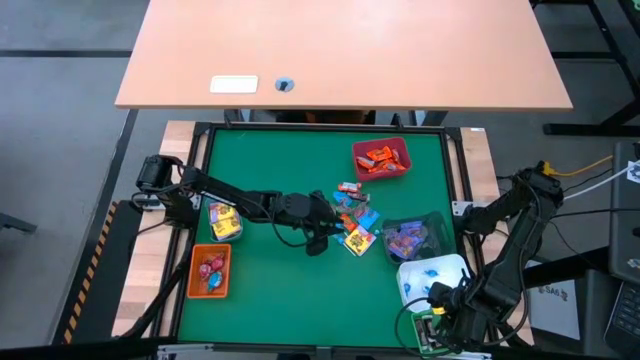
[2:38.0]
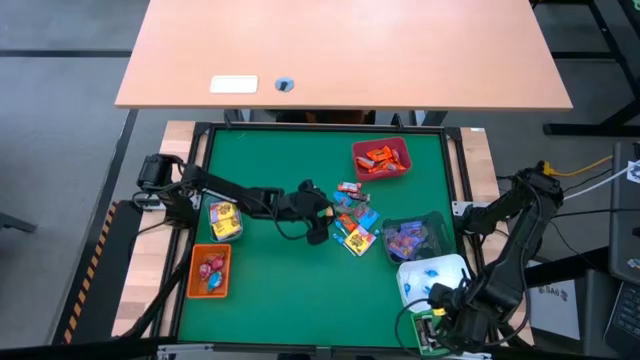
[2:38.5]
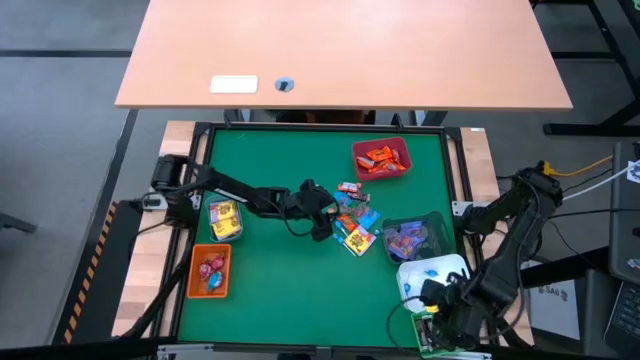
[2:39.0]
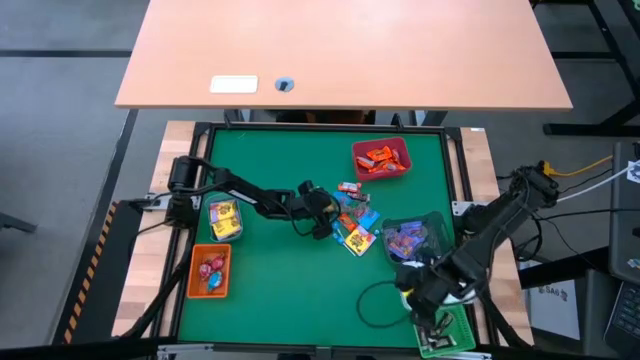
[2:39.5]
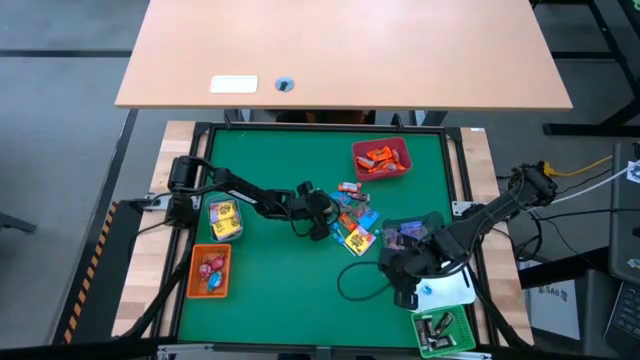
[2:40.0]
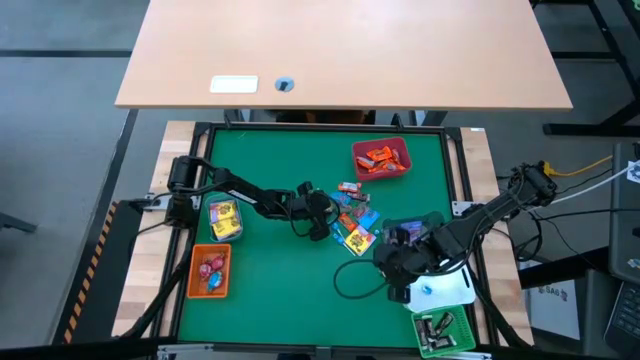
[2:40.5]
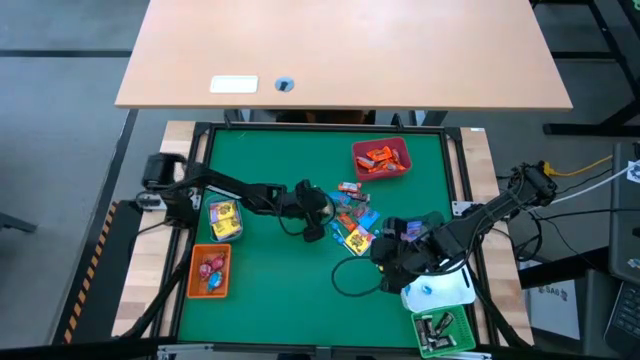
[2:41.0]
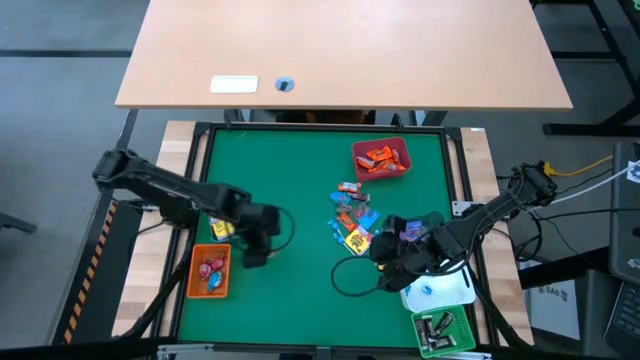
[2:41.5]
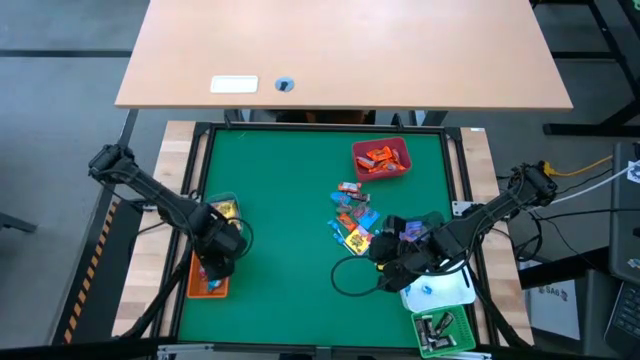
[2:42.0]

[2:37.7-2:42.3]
Task: Sort candy
Put the yellow candy into the orange bin

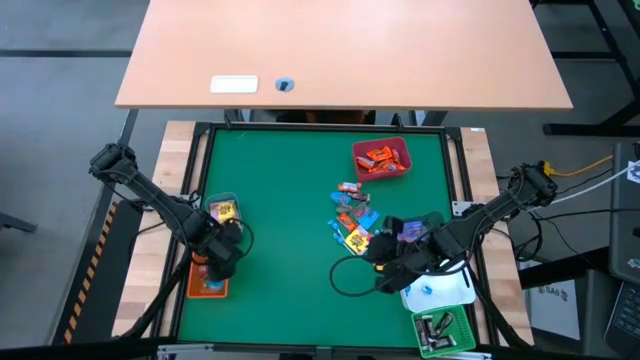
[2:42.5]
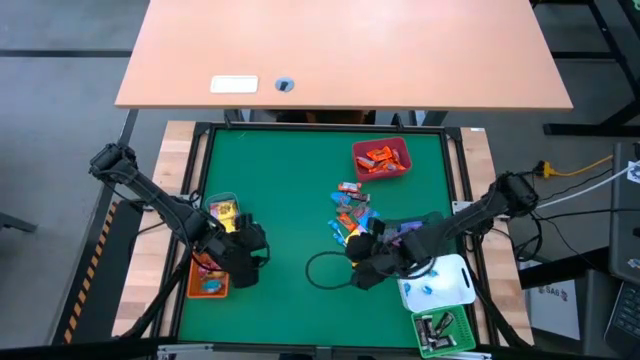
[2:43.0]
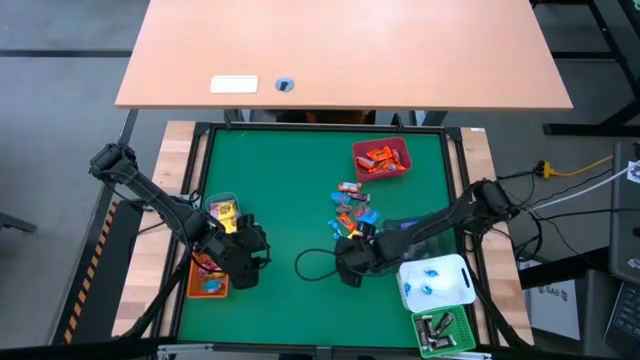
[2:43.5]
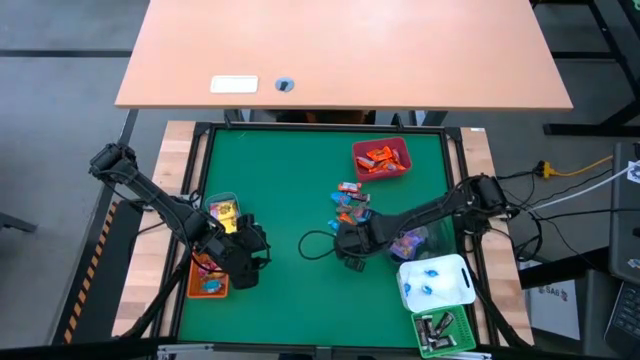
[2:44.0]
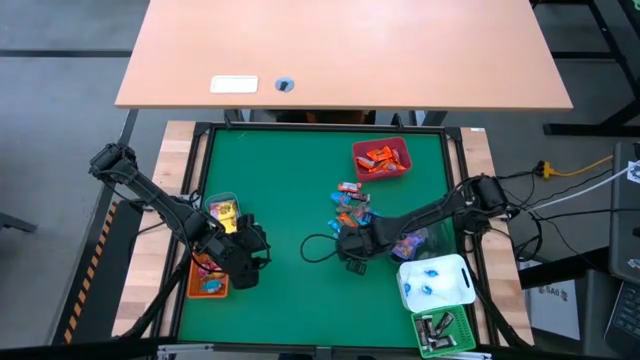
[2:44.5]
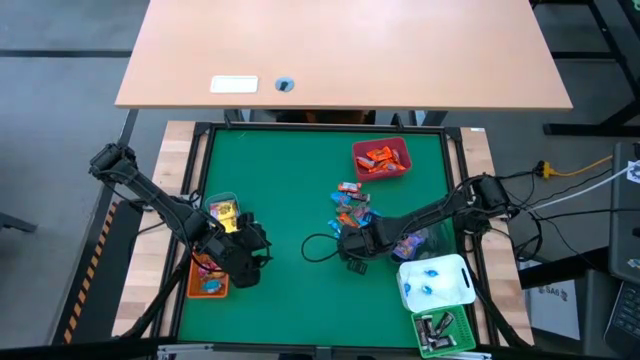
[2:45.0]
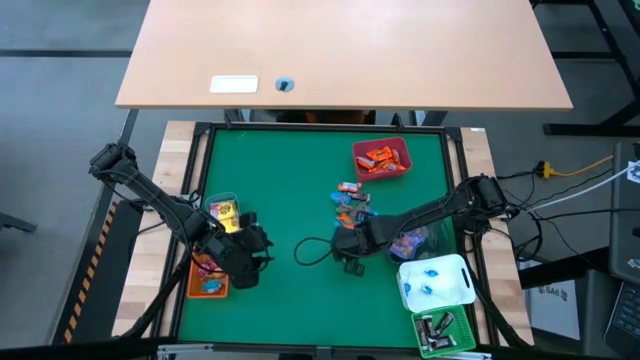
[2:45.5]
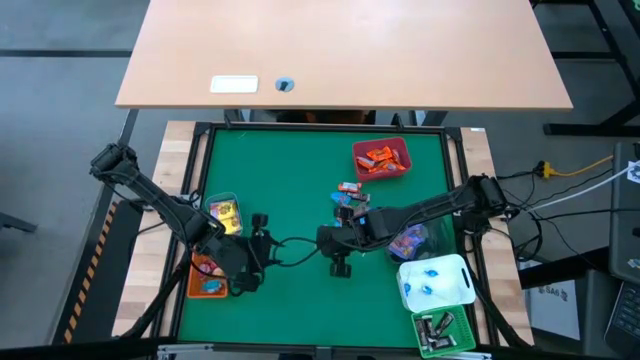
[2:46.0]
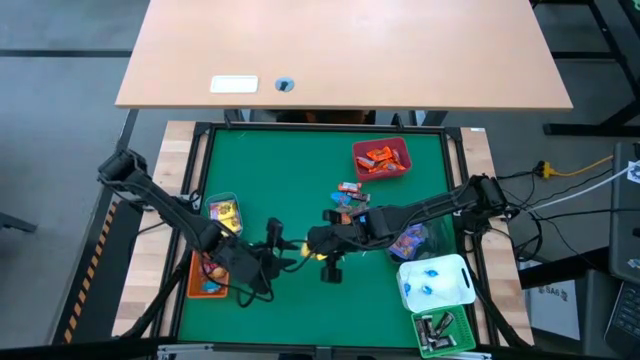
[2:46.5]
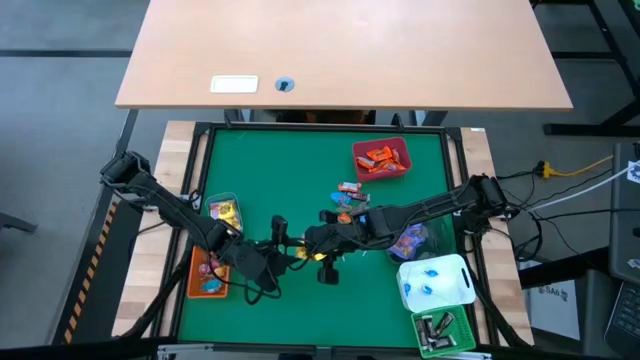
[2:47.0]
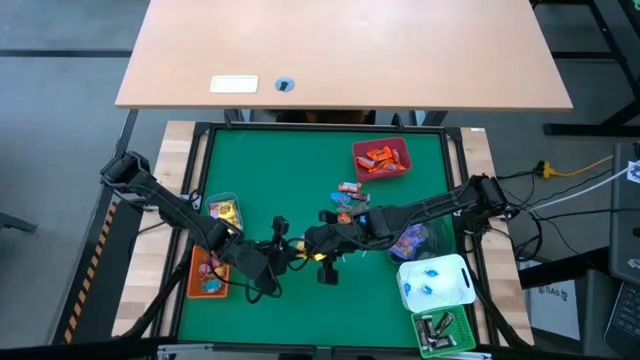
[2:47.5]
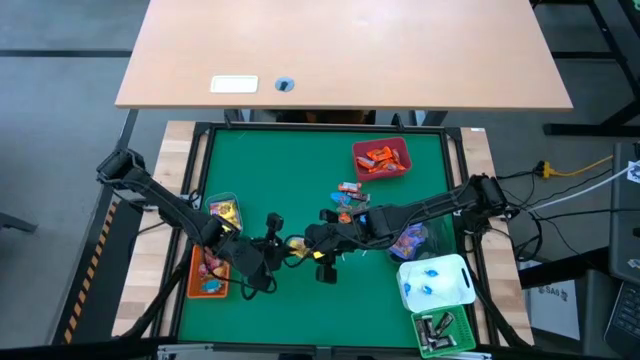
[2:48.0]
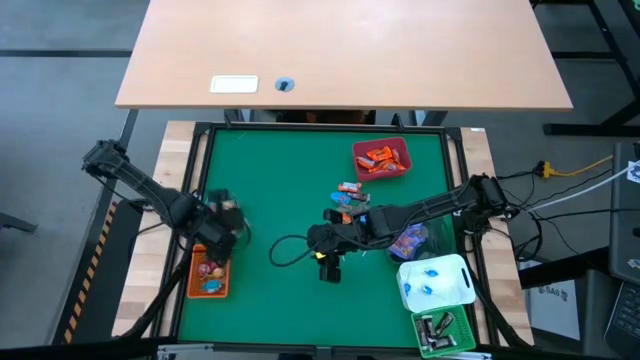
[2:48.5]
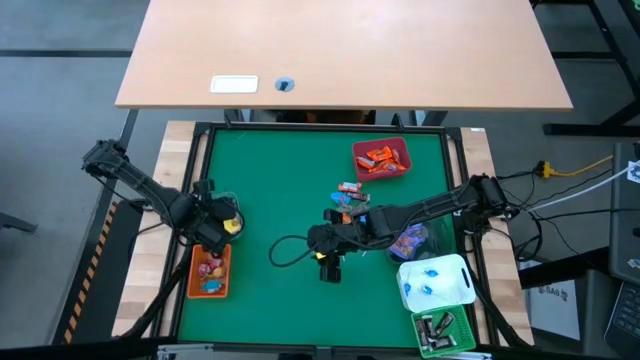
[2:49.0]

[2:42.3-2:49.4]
Put the yellow candy into the blue bin

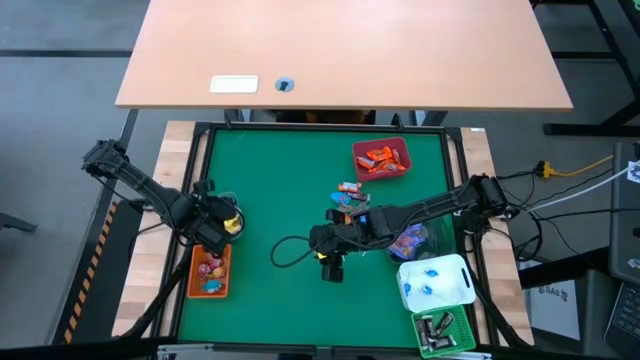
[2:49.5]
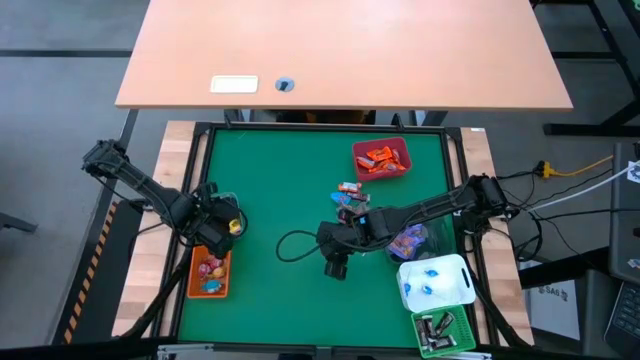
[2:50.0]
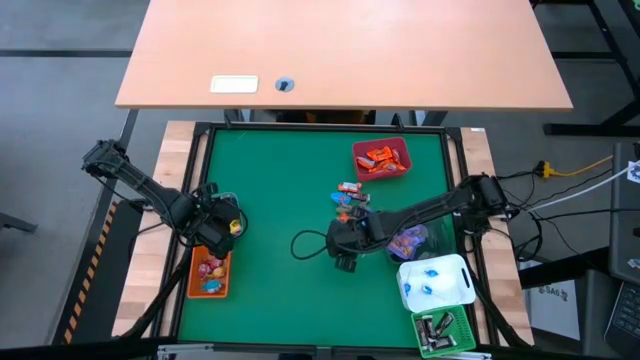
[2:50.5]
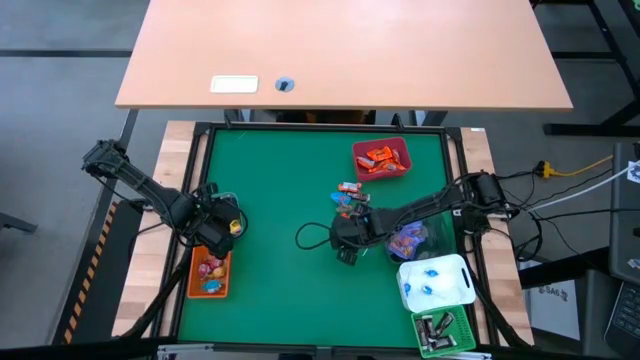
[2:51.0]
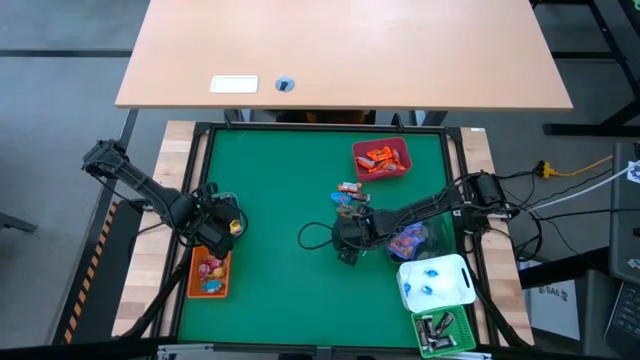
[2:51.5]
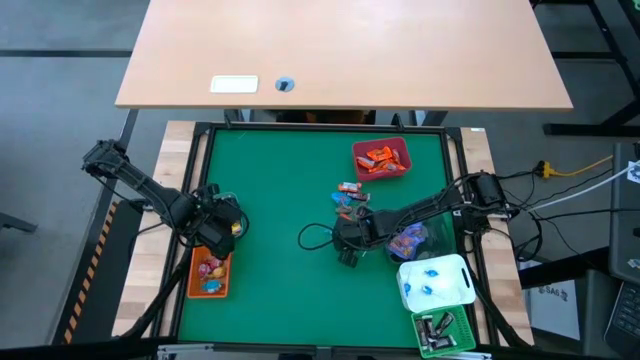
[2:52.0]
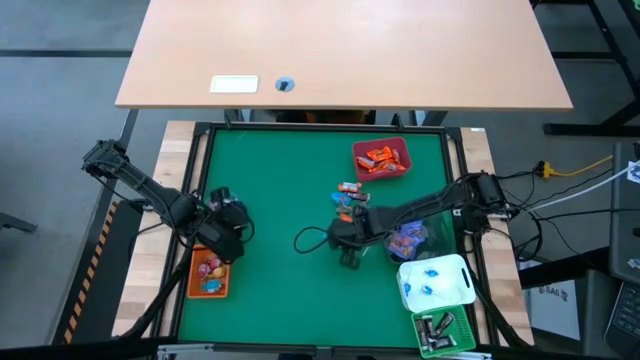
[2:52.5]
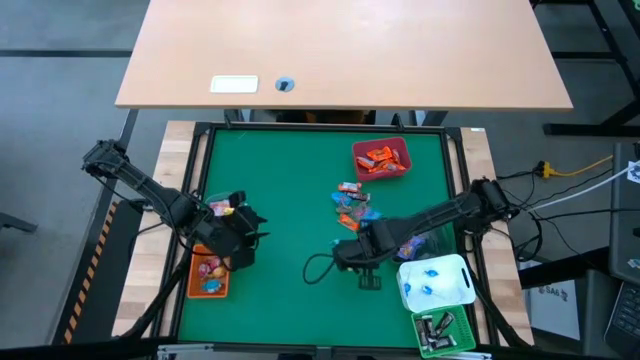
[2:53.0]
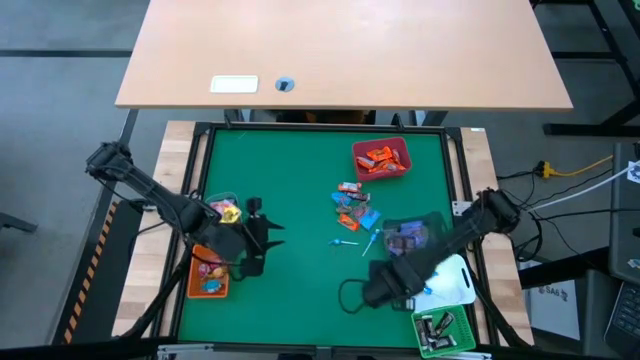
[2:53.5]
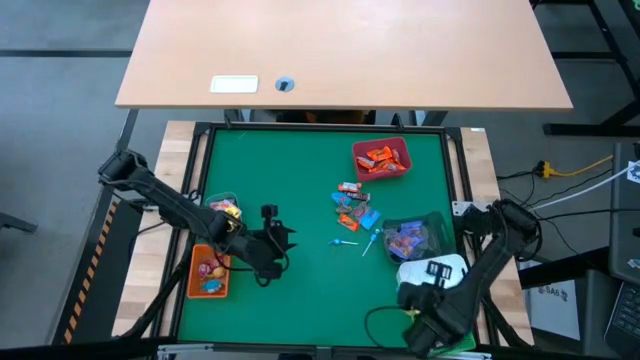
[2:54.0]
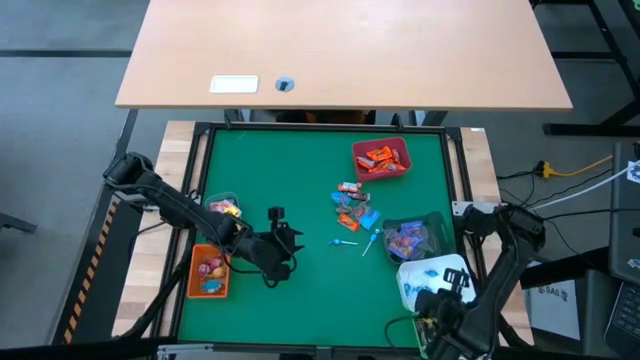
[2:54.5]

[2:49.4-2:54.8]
Put the blue candy into the white bin

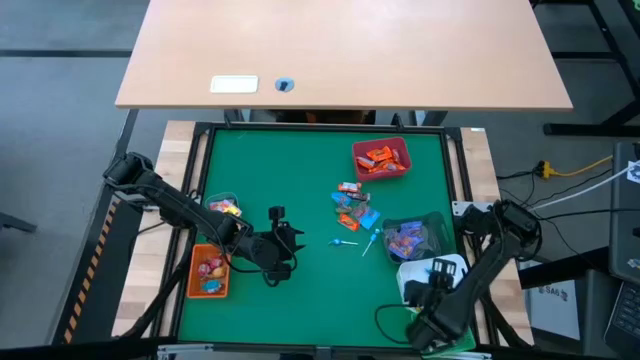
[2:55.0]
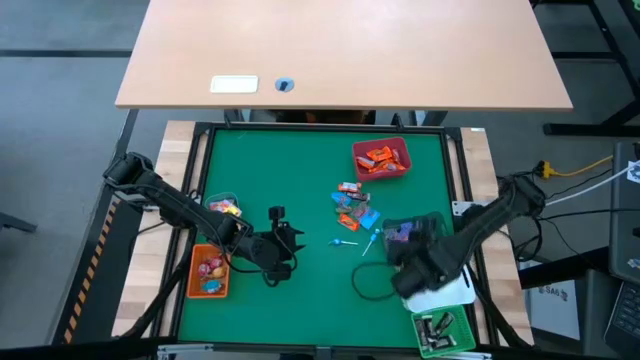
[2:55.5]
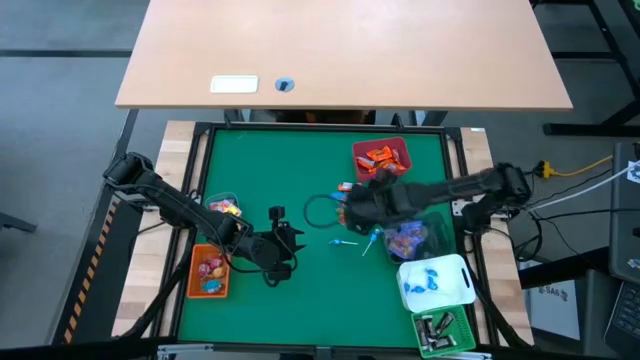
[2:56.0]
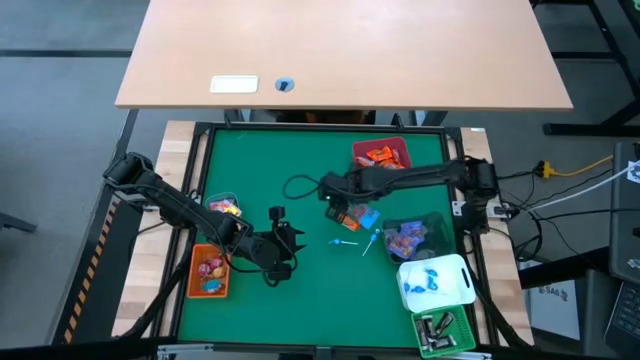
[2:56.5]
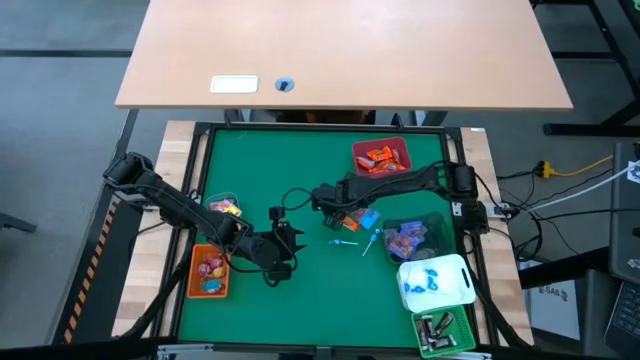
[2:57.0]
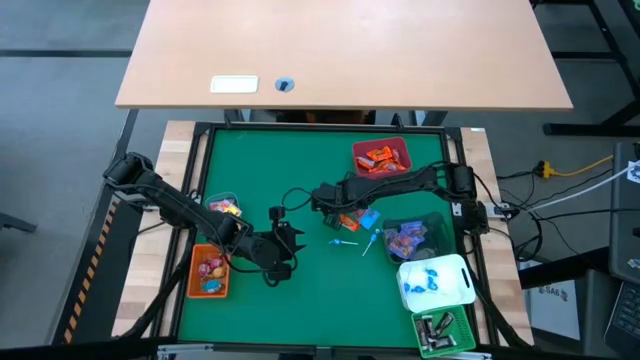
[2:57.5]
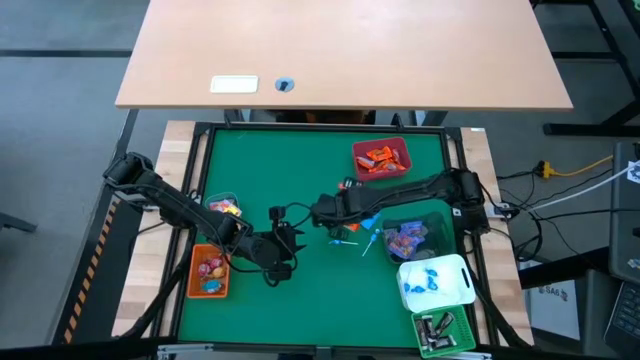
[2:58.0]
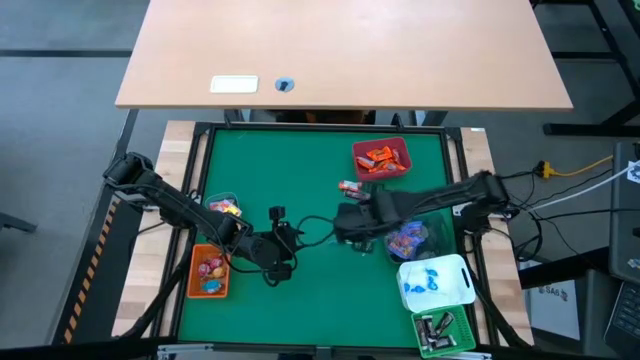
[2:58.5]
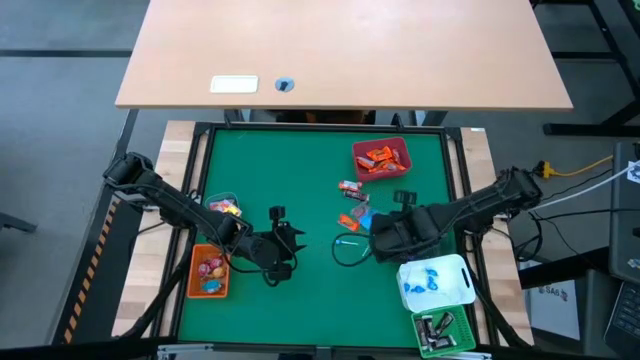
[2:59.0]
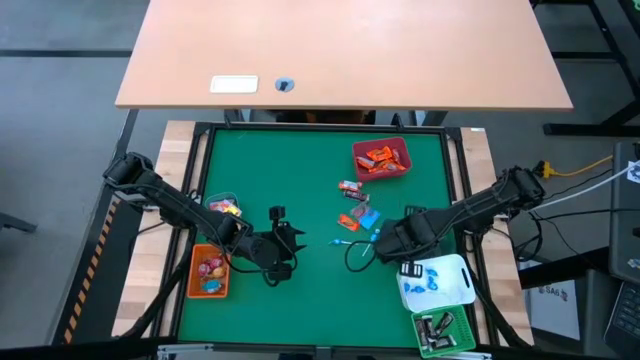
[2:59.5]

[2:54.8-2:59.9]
Put the blue candy into the black bin

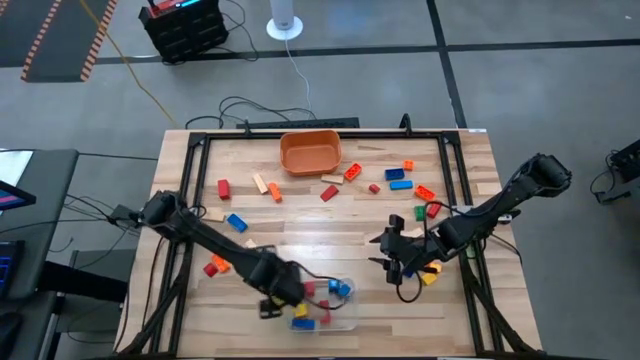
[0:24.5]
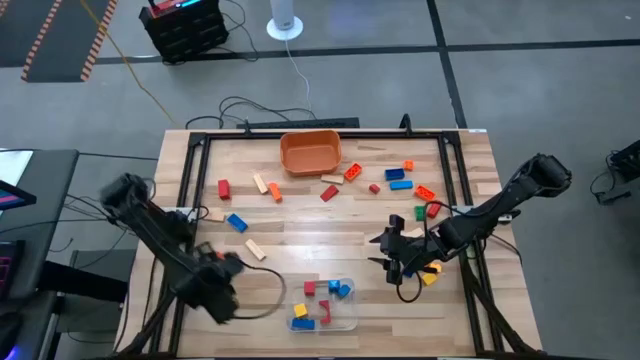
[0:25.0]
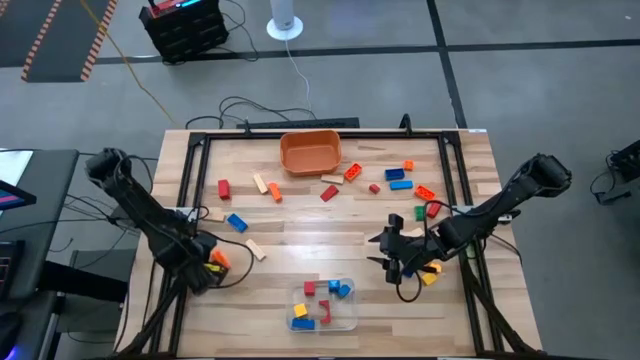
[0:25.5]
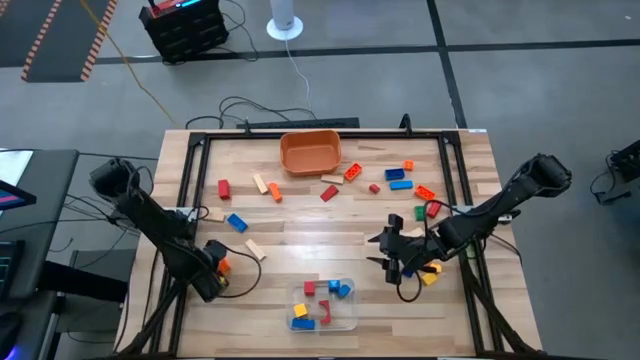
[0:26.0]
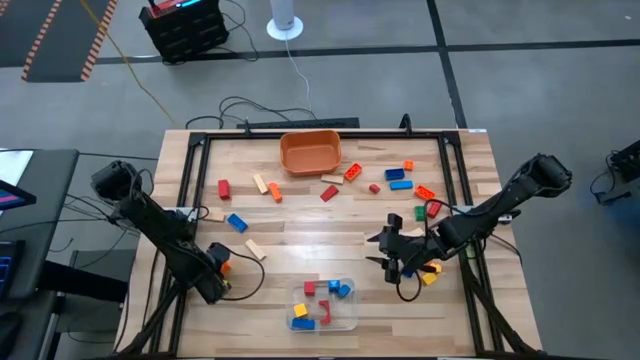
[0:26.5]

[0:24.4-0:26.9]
Task: Sort blocks by size
Put the small red wooden block into the orange bin
